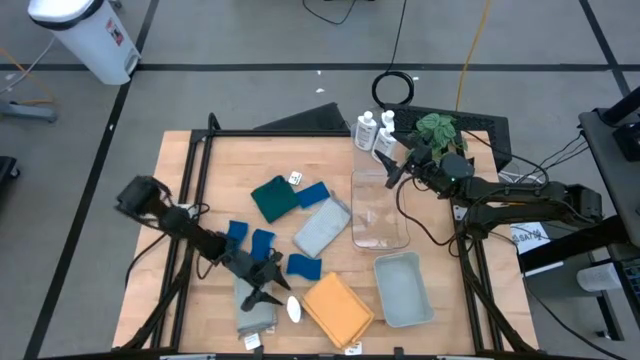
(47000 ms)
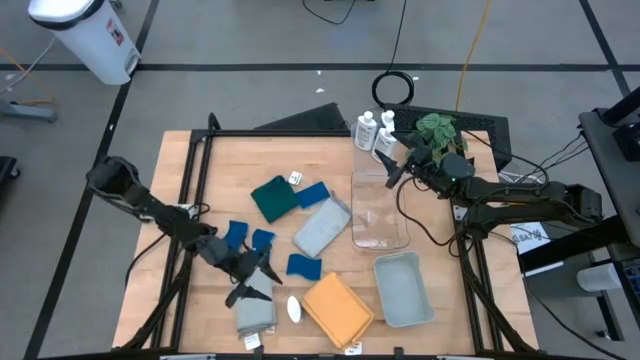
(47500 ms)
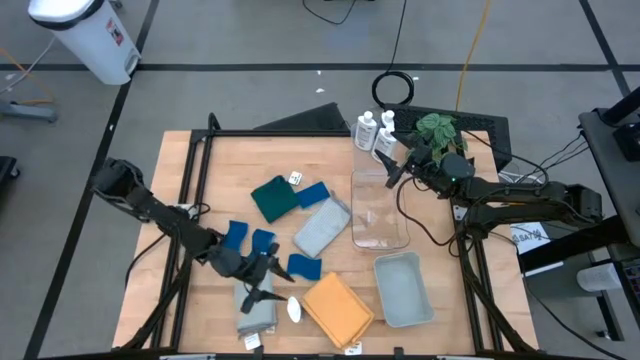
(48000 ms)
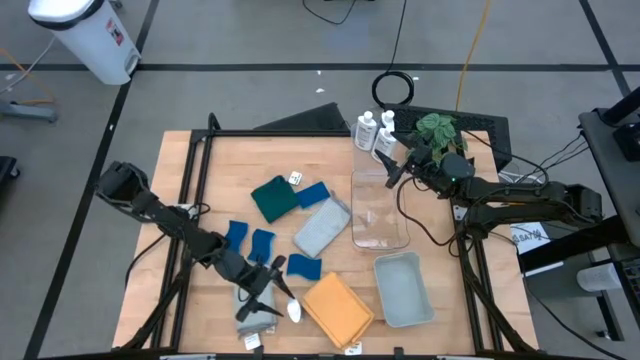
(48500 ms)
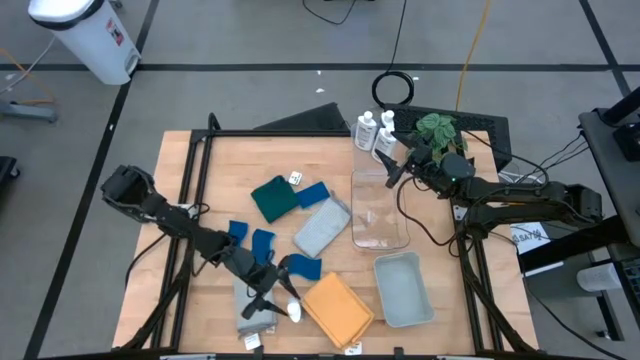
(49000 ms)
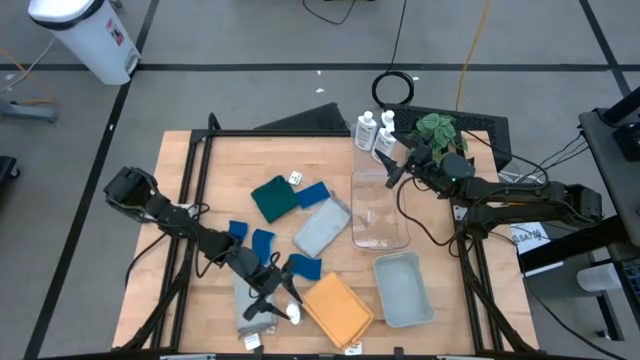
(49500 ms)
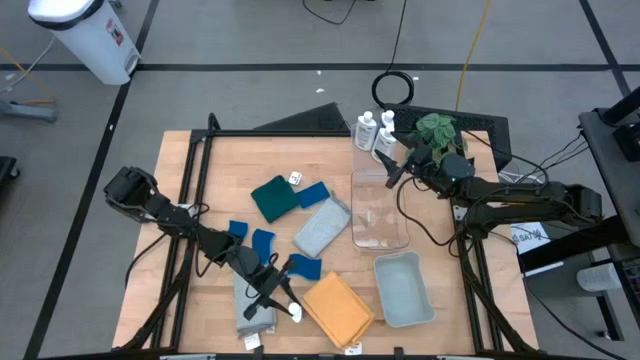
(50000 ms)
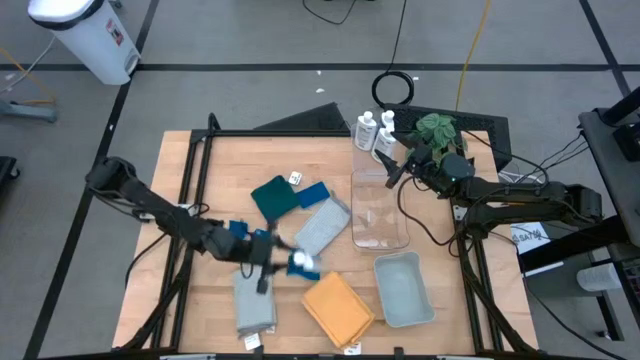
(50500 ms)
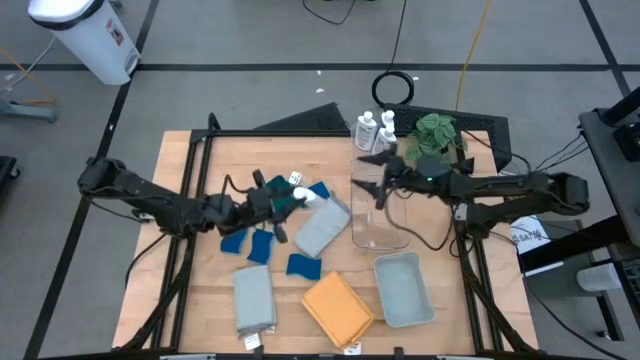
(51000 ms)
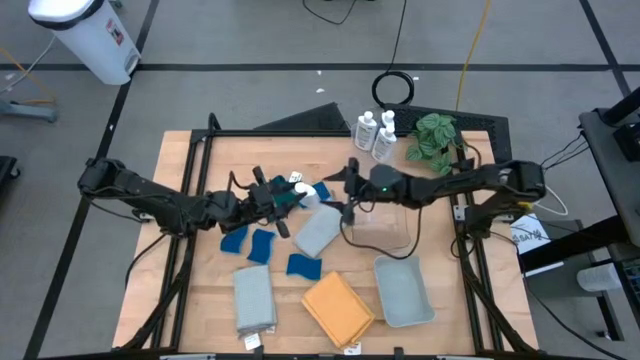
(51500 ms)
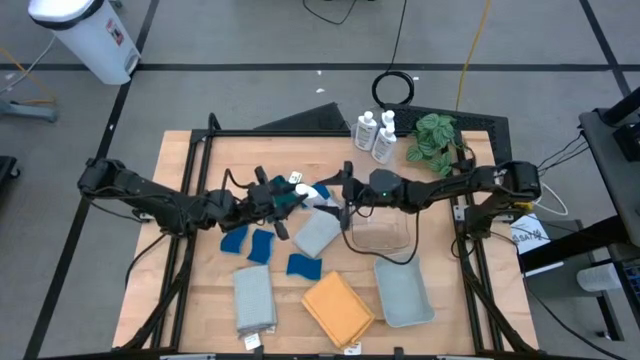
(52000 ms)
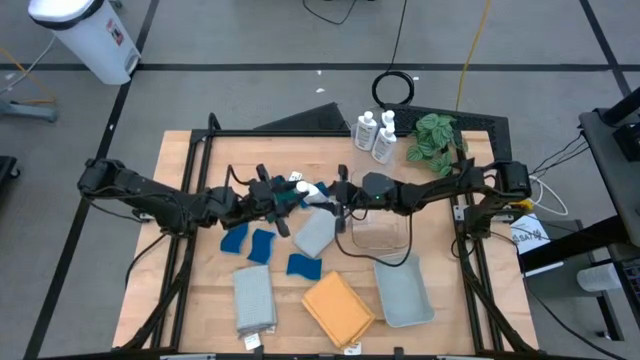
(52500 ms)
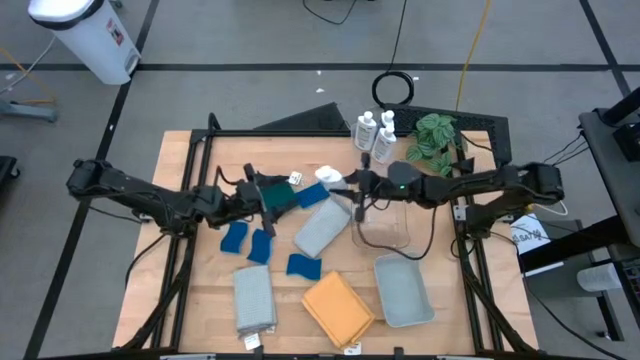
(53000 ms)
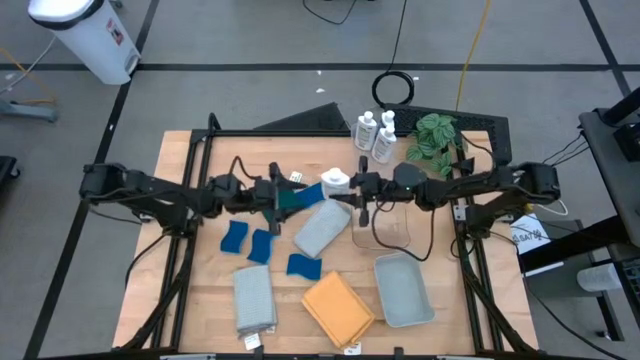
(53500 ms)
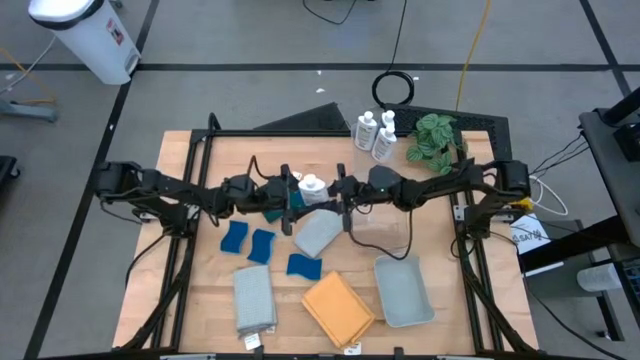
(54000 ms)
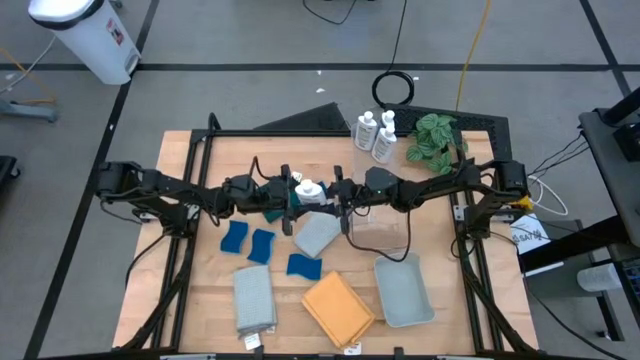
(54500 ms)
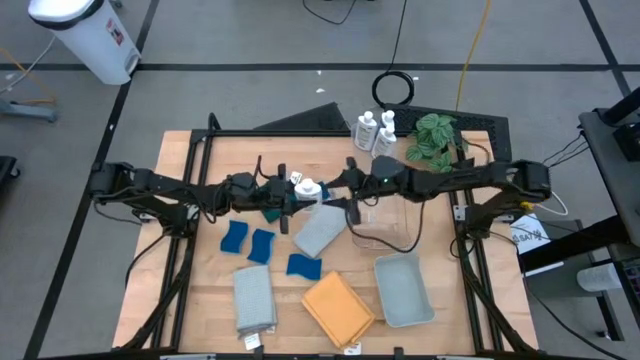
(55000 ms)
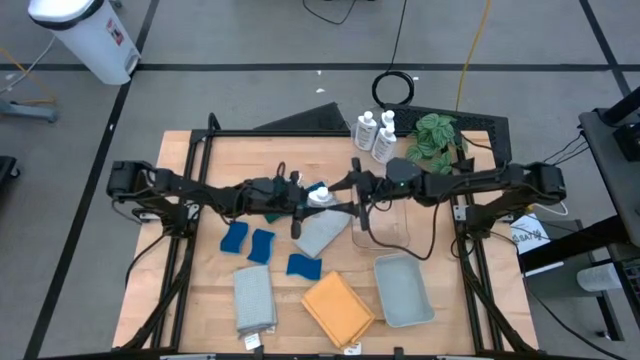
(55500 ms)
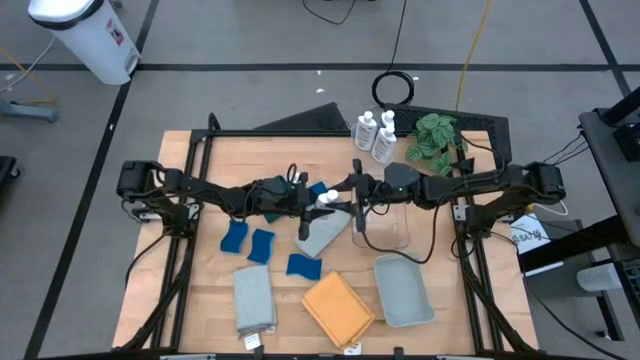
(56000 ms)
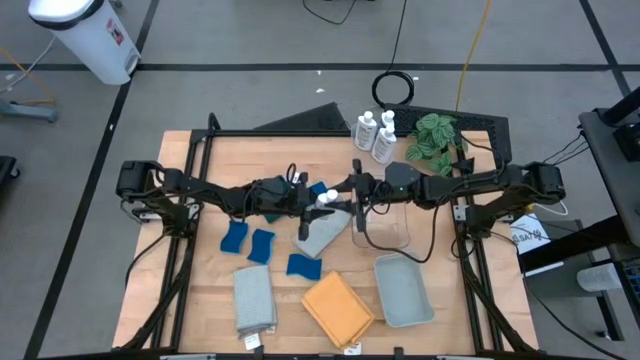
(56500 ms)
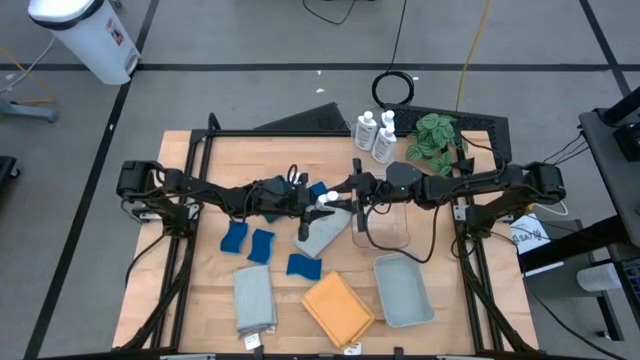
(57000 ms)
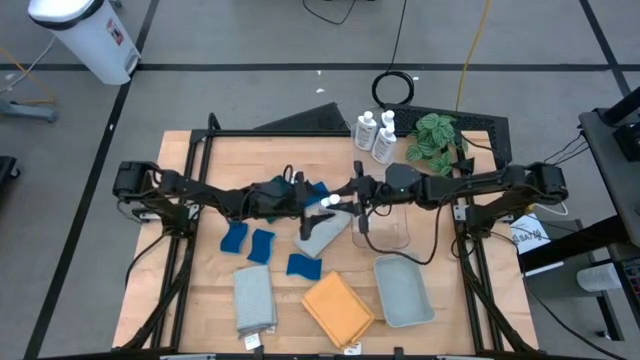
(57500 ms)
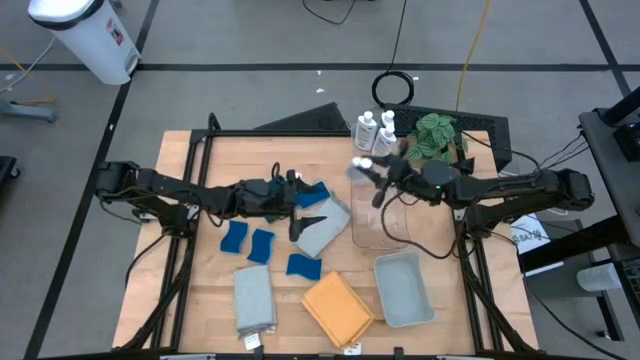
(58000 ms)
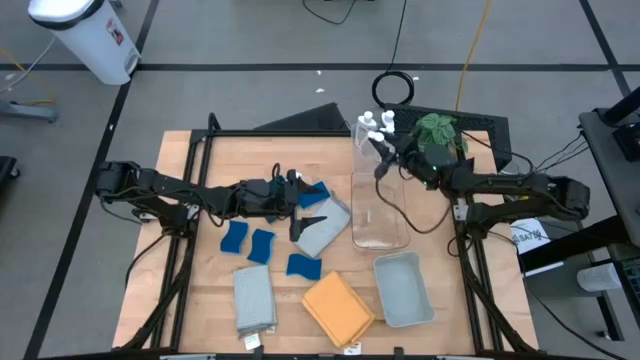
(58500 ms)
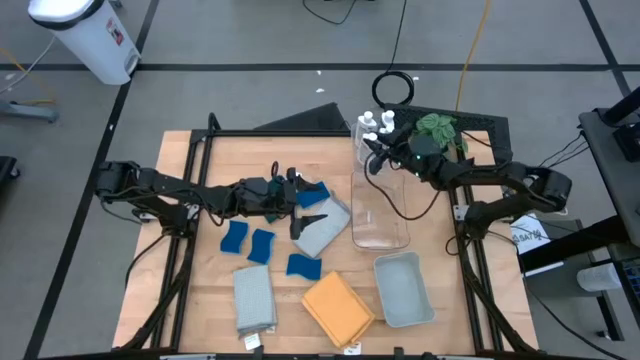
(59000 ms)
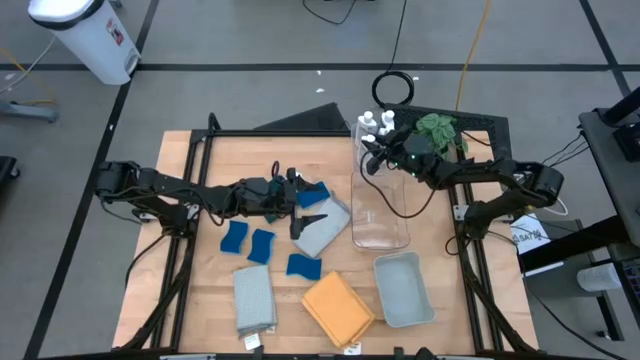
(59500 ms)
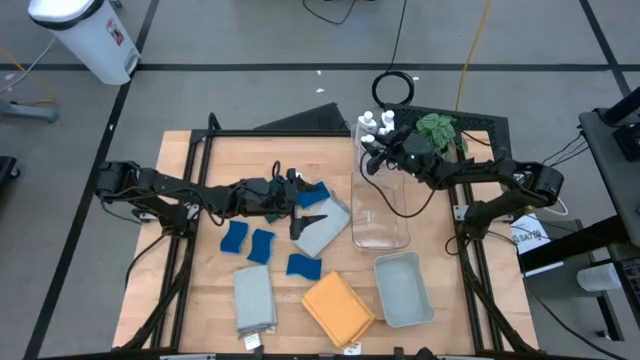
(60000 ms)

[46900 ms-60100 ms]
Task: Pick & Place Kitchen Items
Put the white plastic restorer bottle into the top transparent bin

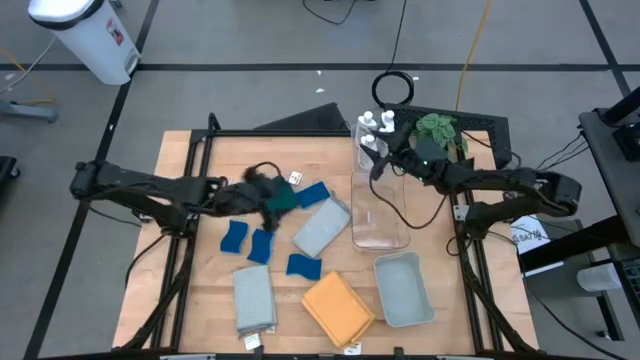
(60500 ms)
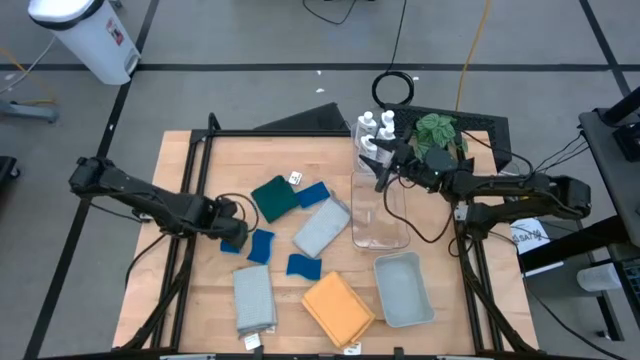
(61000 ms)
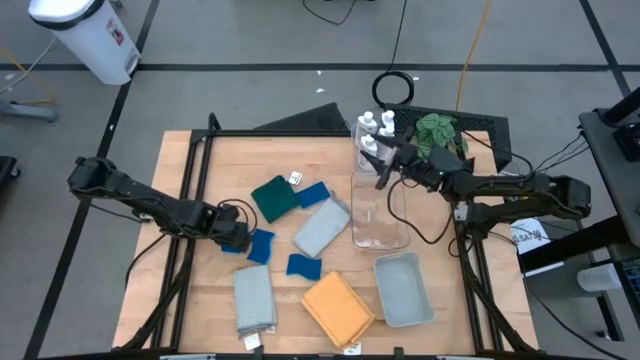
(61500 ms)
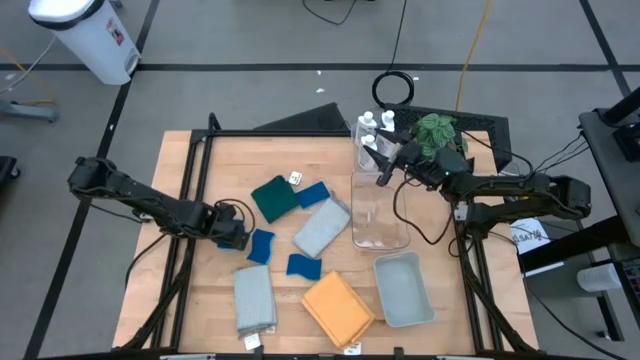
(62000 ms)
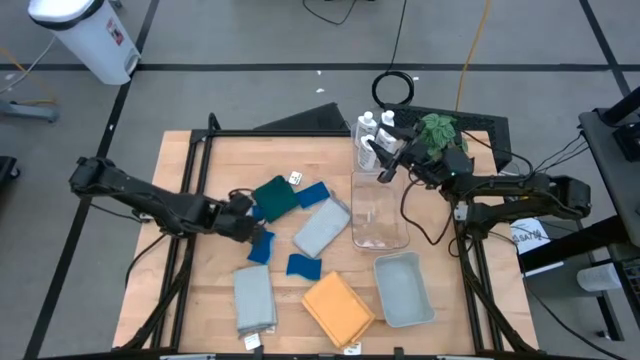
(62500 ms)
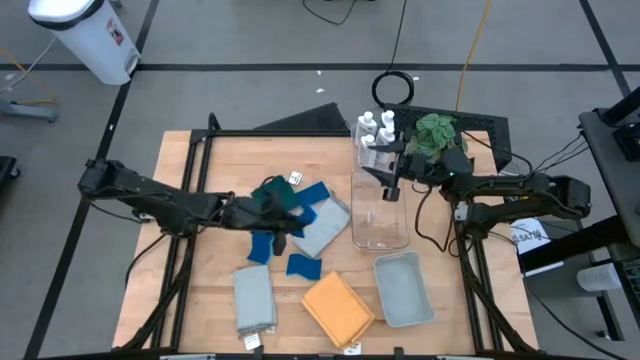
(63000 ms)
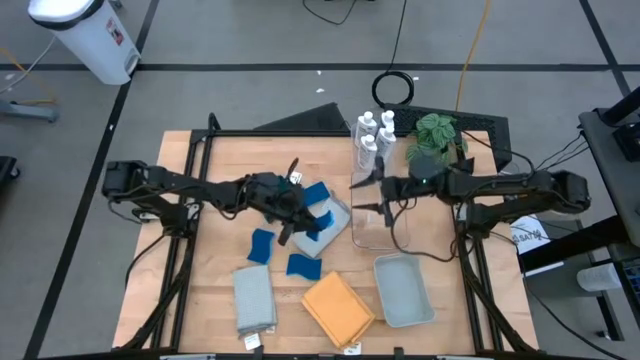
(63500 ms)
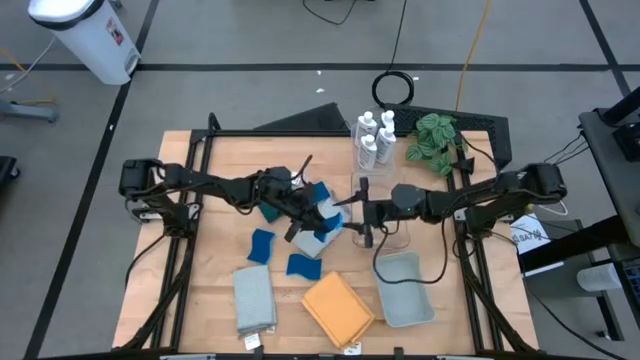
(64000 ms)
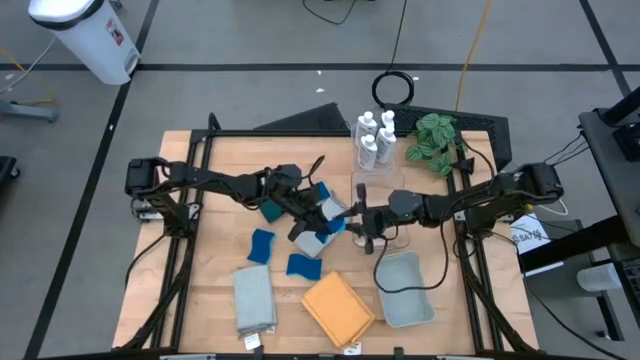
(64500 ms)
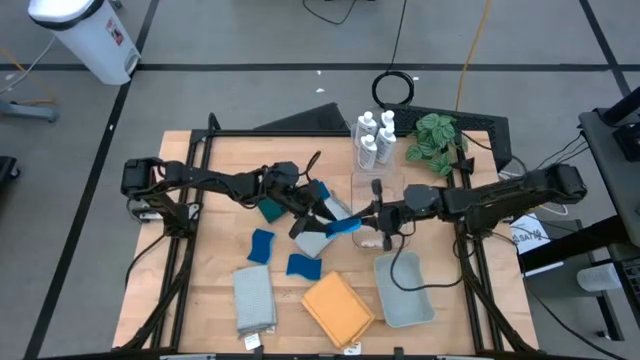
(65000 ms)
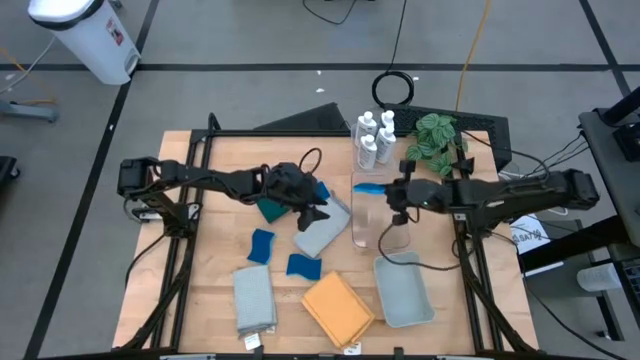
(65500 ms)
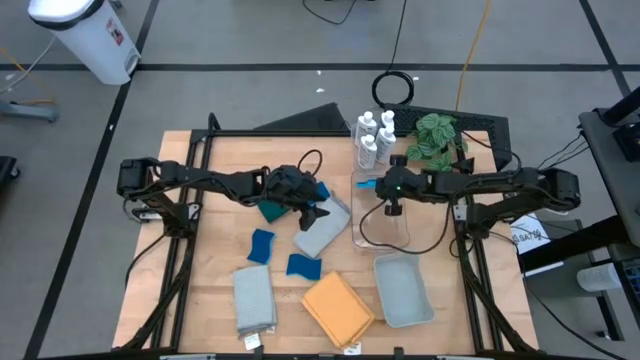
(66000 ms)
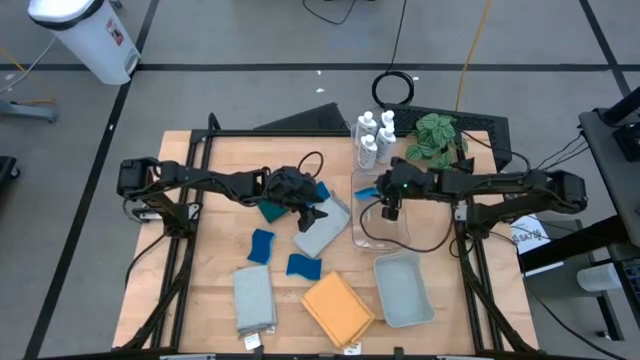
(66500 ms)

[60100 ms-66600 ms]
Put the blue sponge into the gray bin

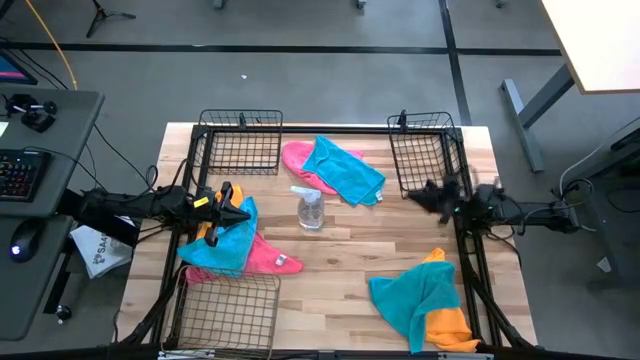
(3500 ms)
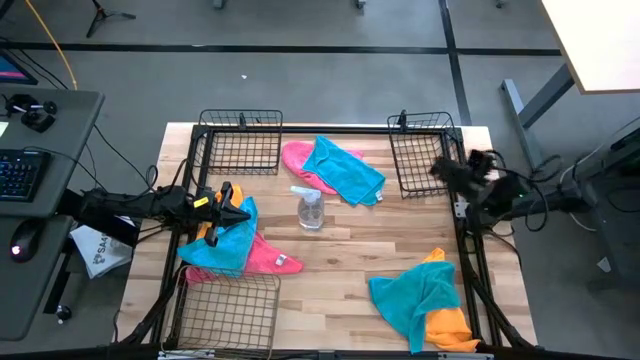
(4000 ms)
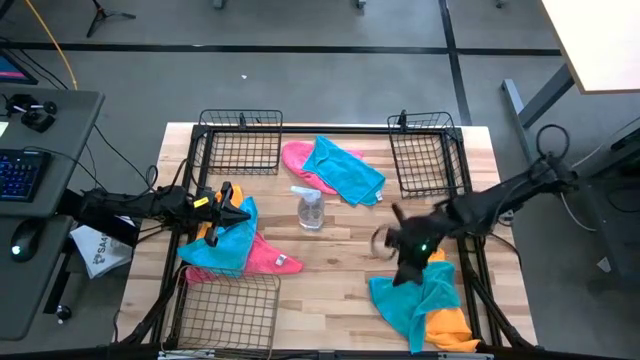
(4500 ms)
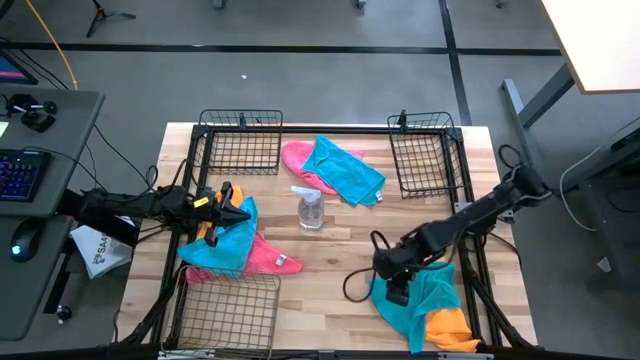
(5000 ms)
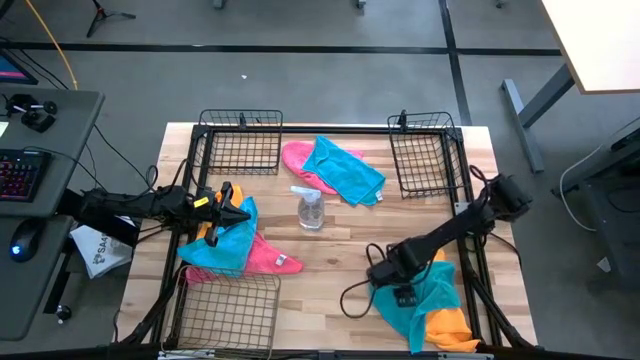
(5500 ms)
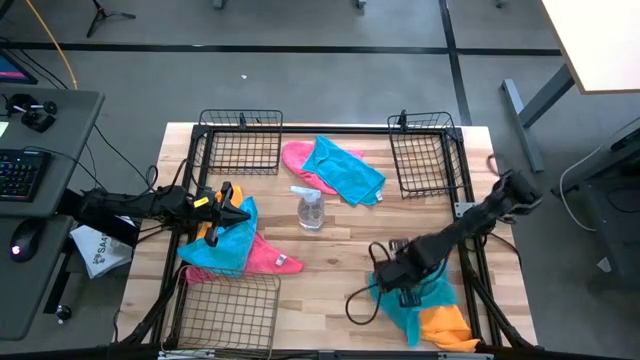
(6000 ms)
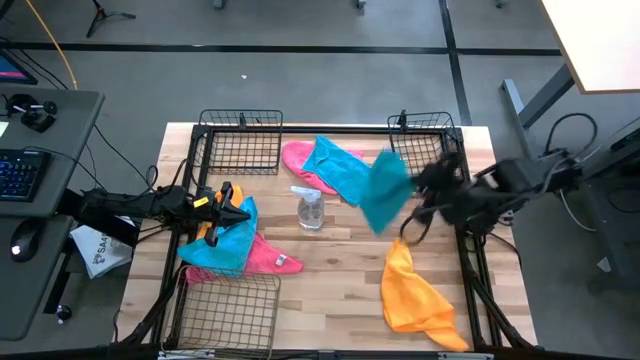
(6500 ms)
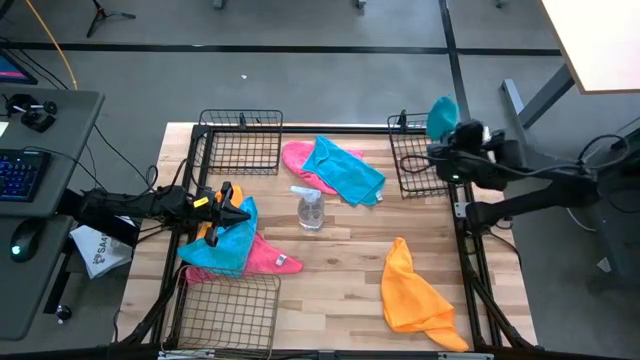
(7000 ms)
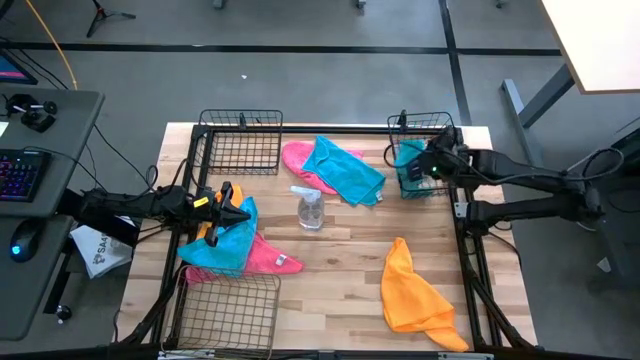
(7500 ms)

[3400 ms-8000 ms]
Task: Sort microfiber towel by color & place in baskets
Put the right blue microfiber towel into the right black wire basket
